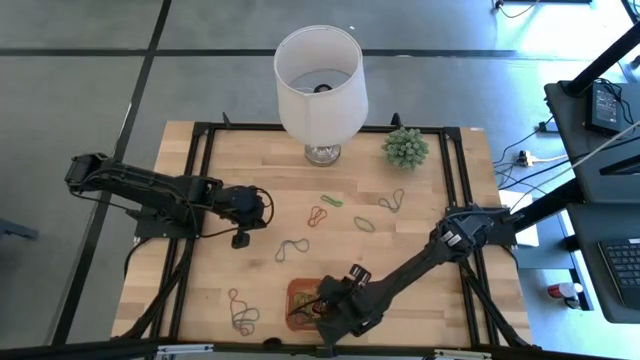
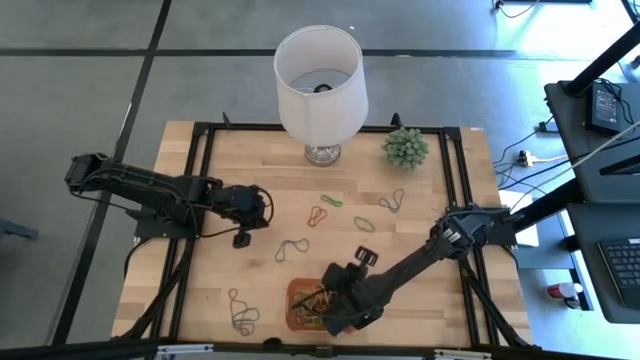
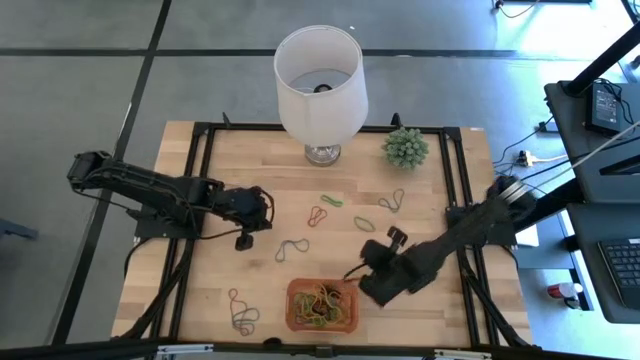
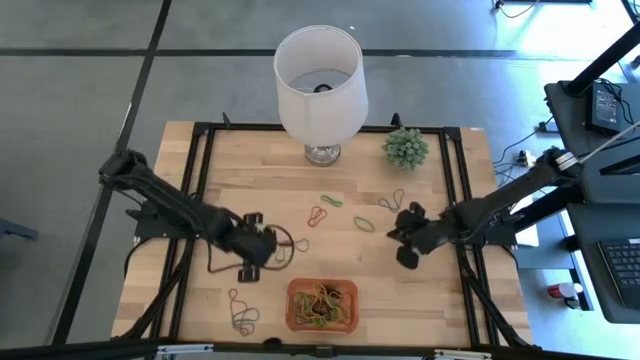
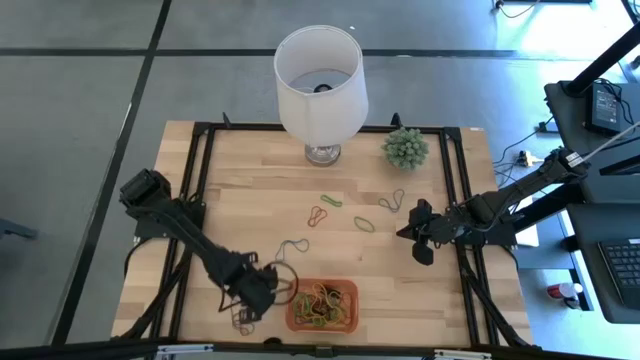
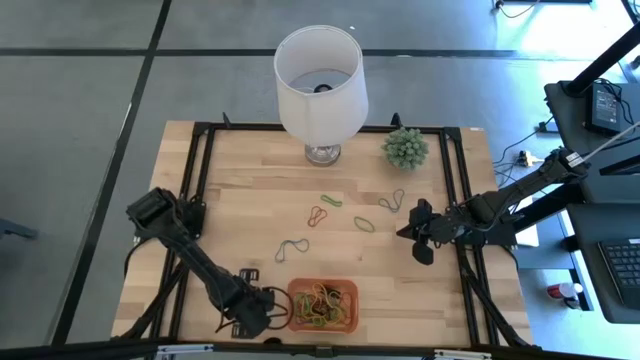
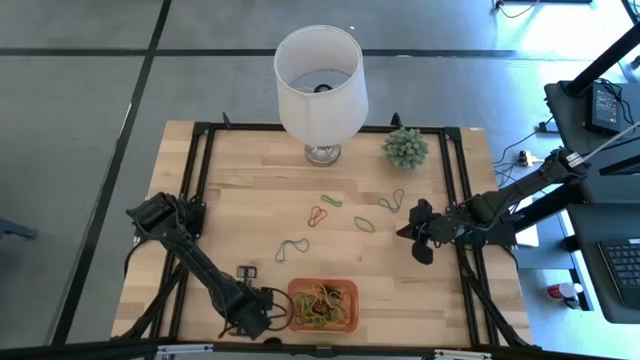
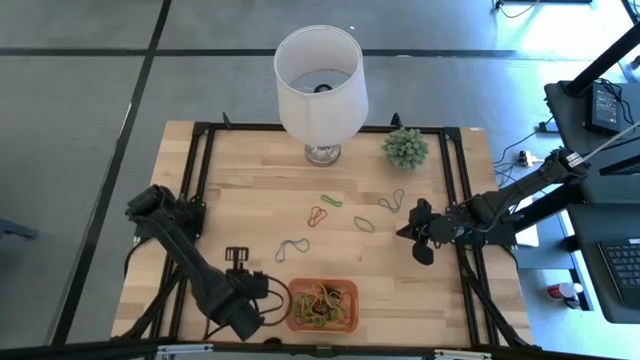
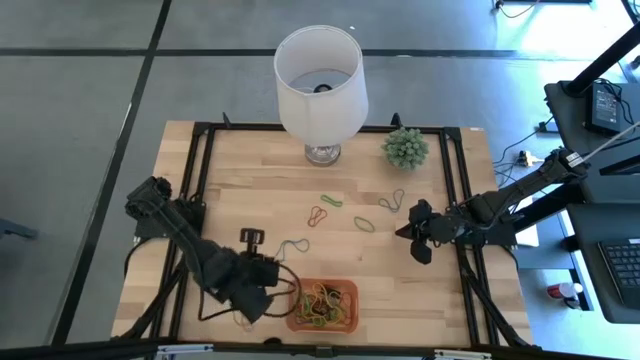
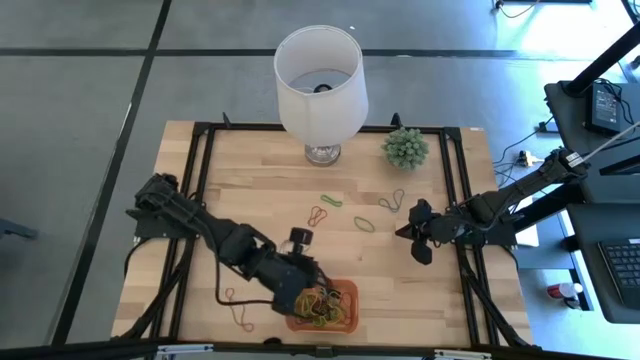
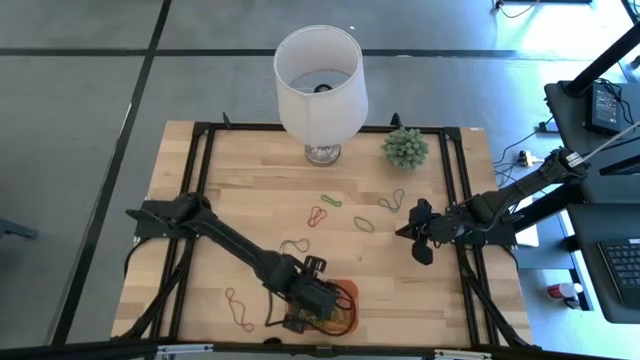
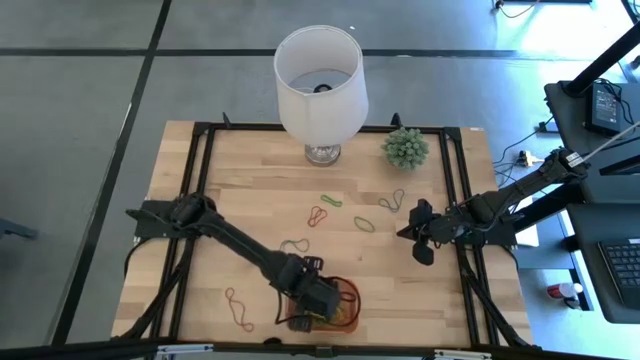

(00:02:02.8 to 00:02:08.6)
Task: Pick and place rubber bands into bin
Put the blue rubber band into the orange bin

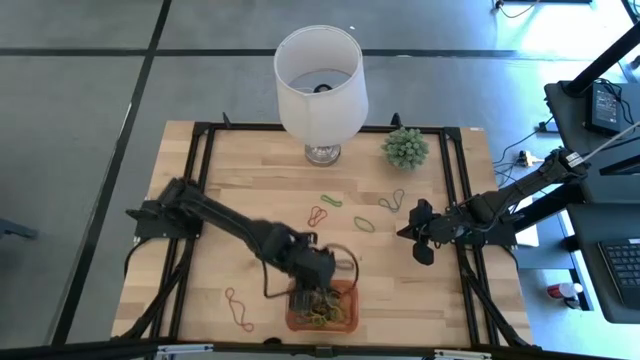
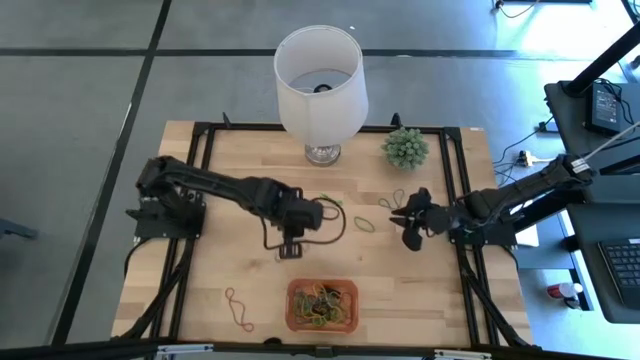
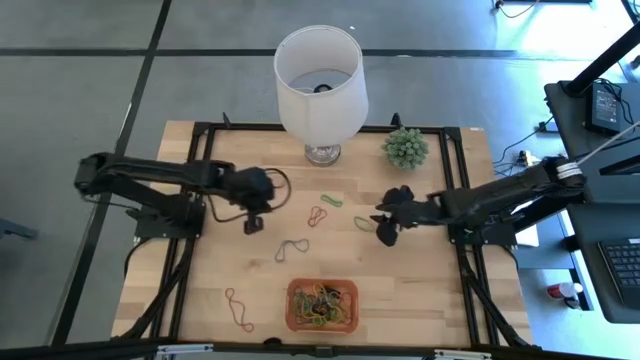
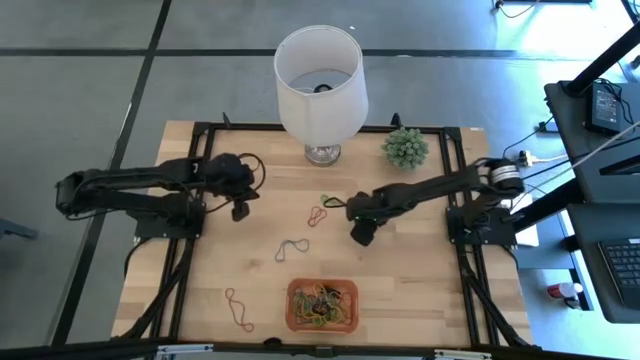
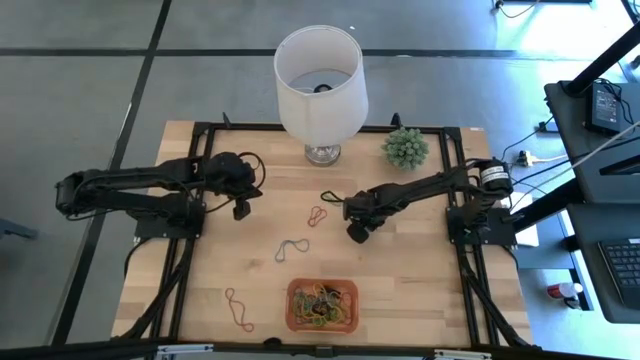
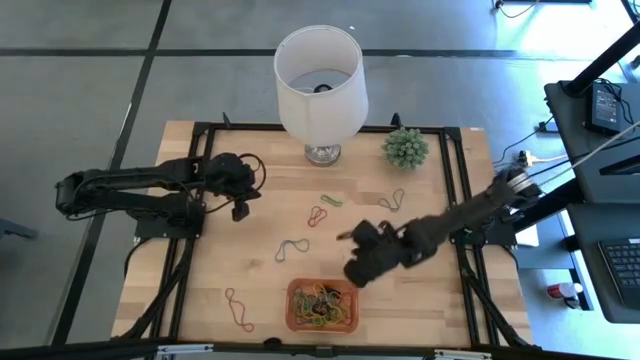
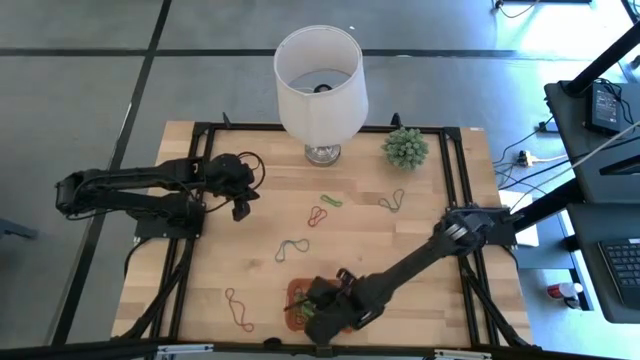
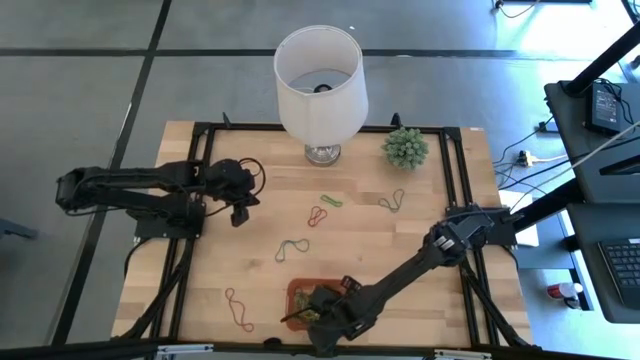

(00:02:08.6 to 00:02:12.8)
Put the green rubber band into the orange bin

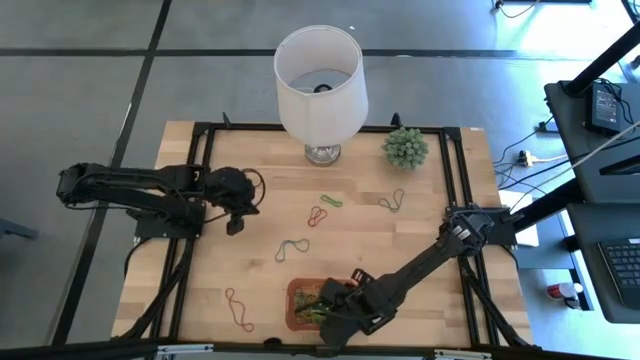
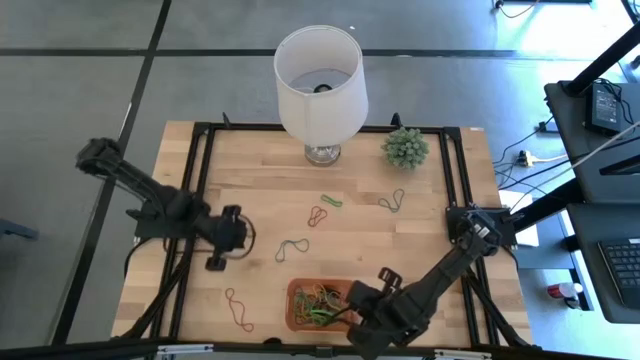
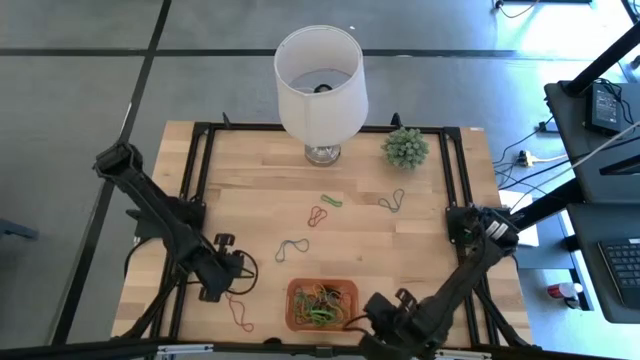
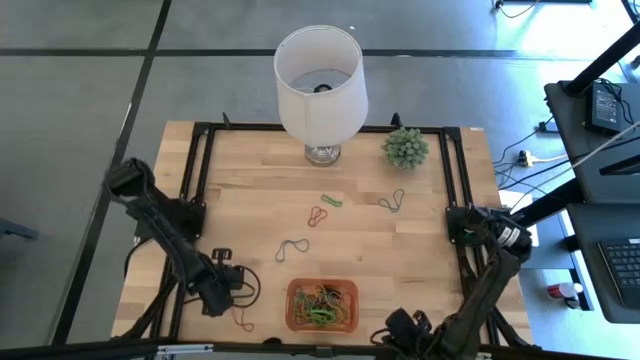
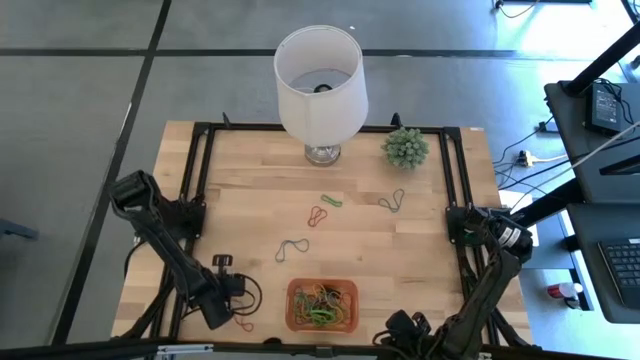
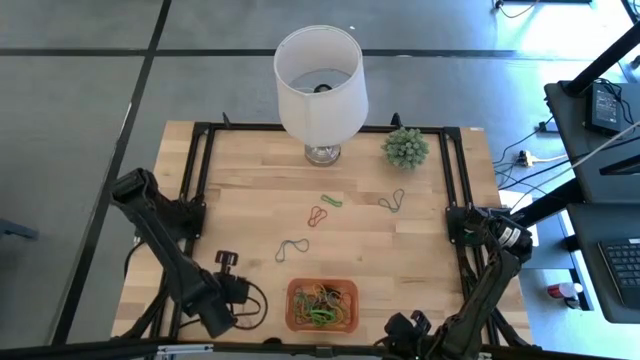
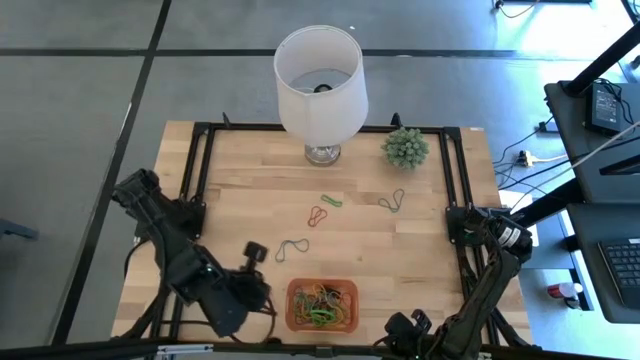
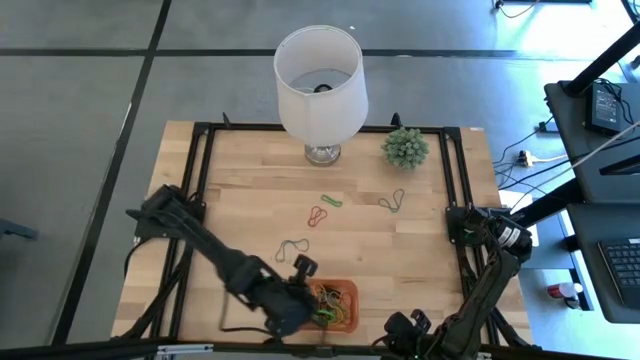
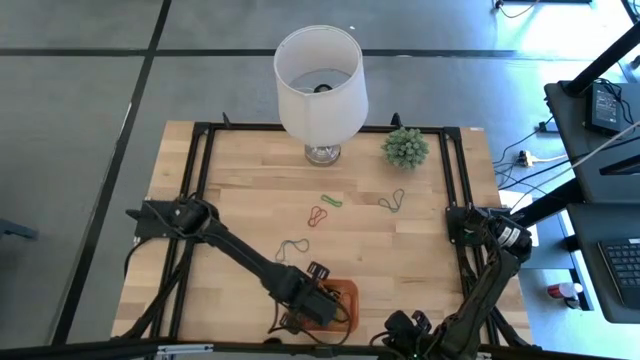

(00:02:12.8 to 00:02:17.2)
Put the red rubber band into the orange bin

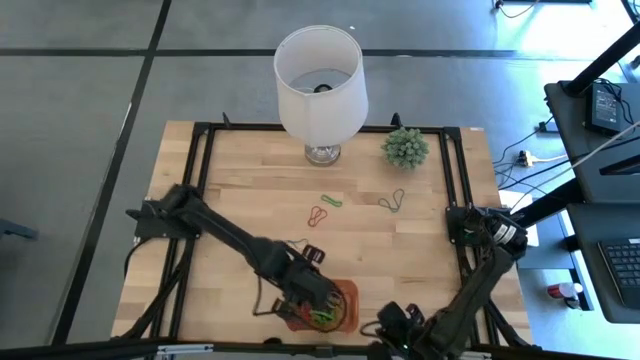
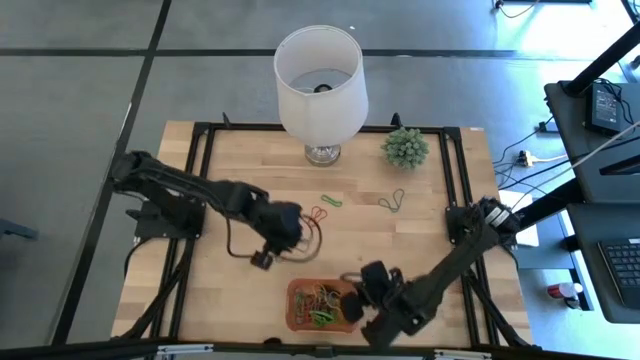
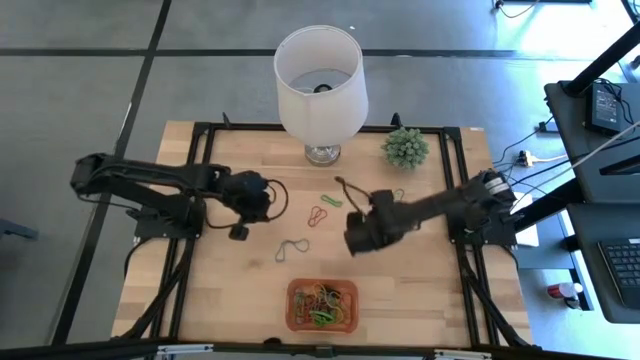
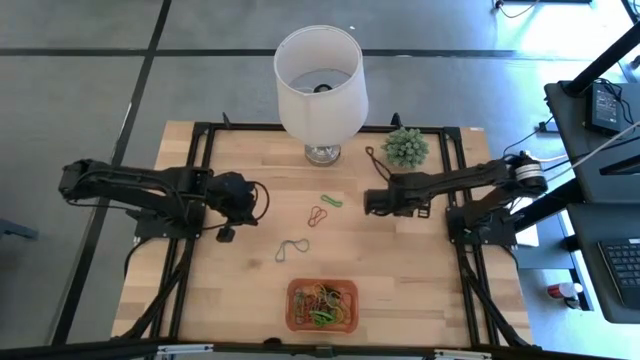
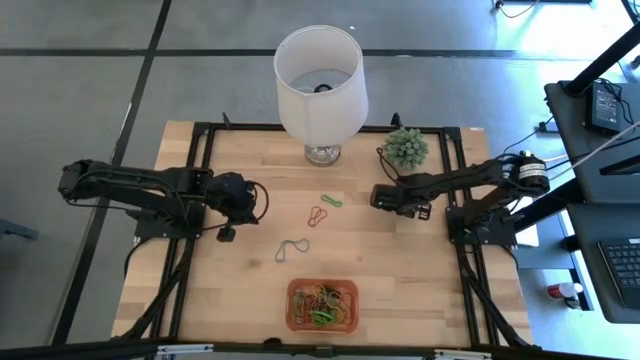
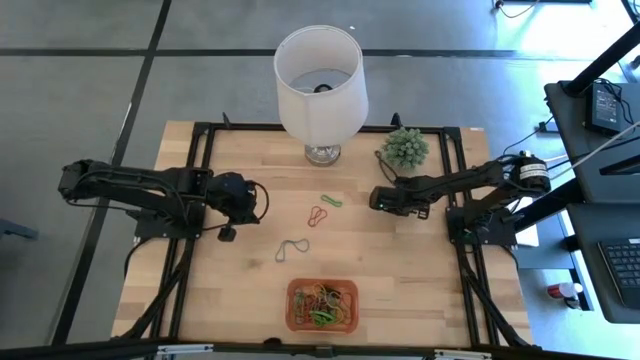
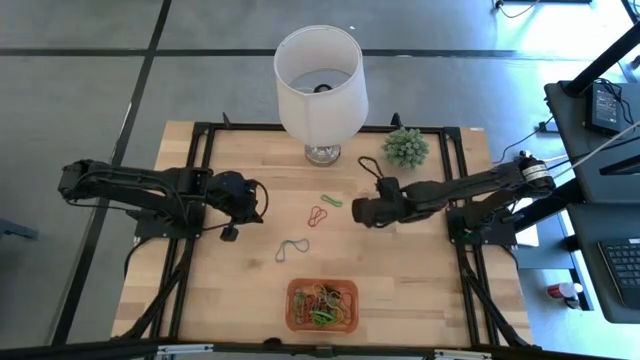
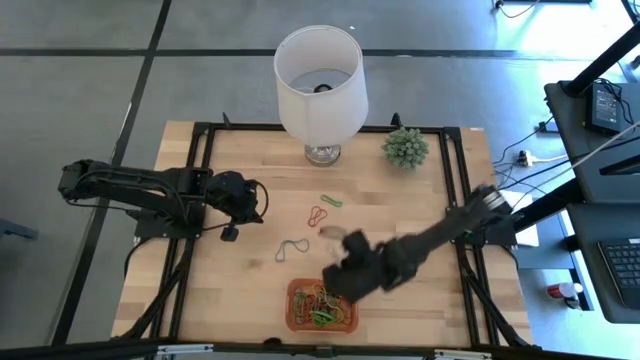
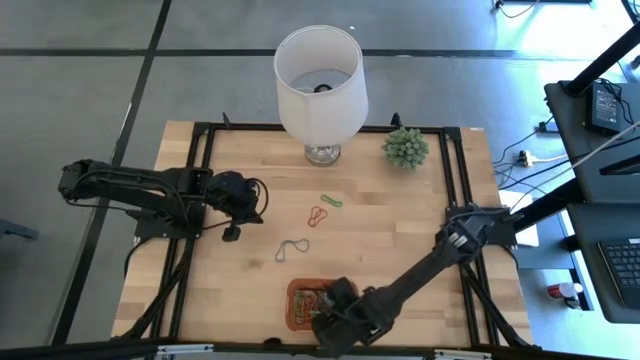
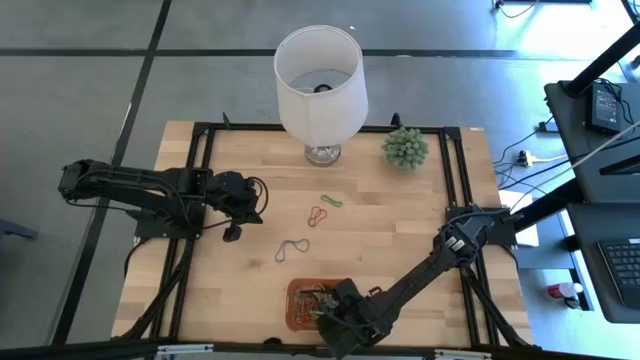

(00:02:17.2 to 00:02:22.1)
Put the blue rubber band into the orange bin

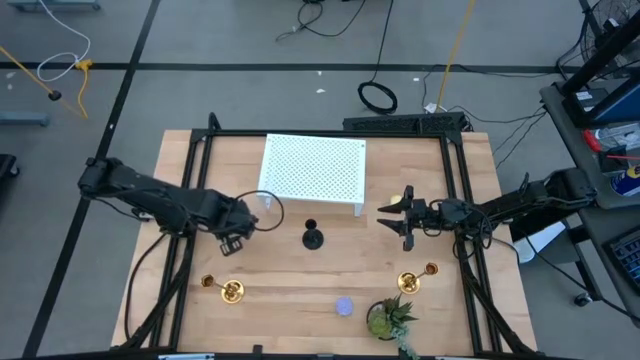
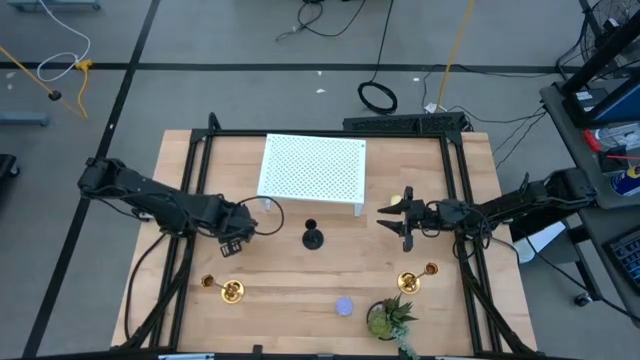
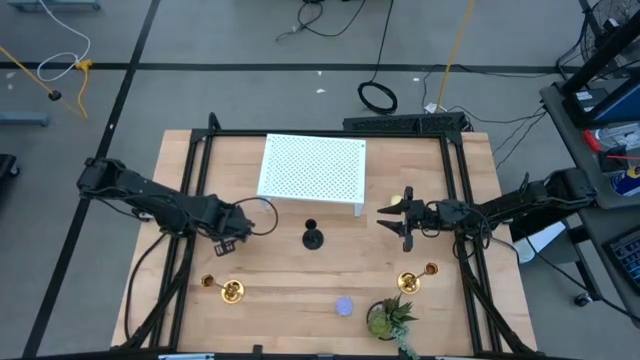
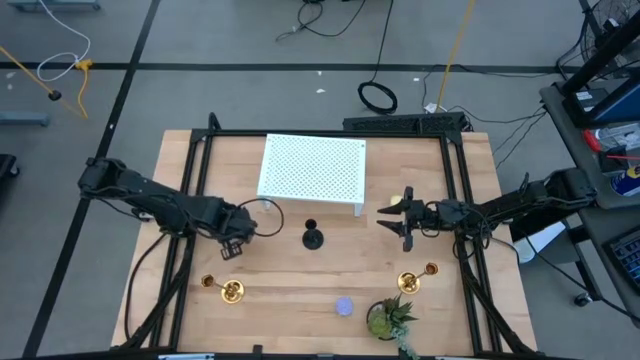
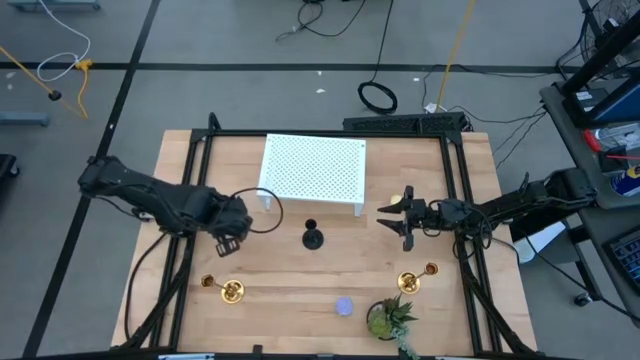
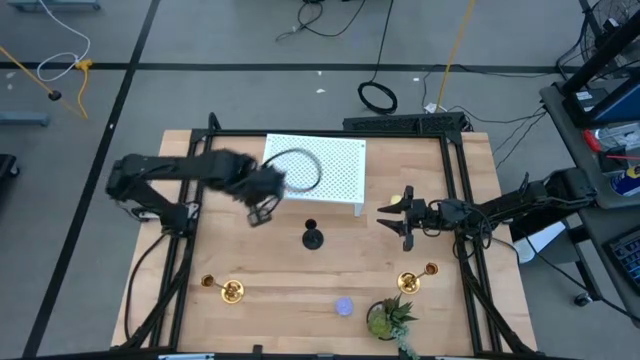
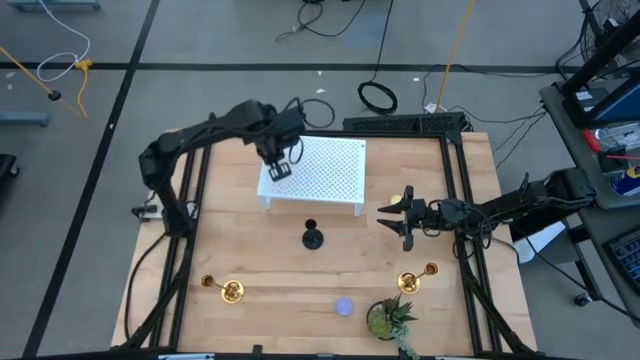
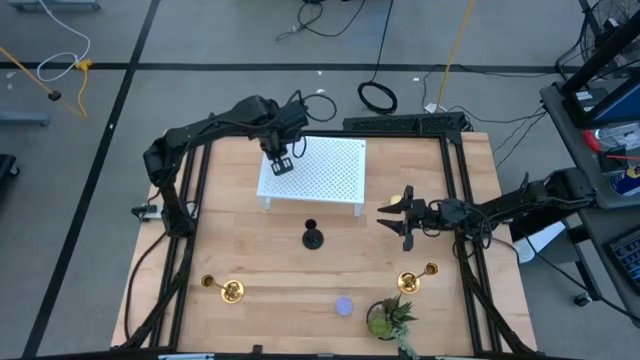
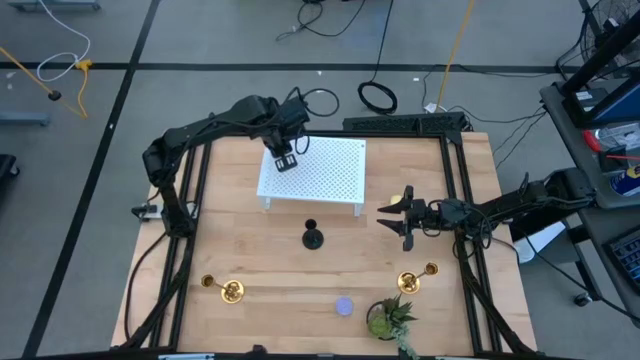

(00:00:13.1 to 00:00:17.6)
Task: Pick & Place candle stick holders
Put the blue scented candle on the shelf
